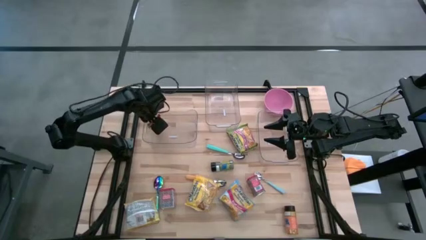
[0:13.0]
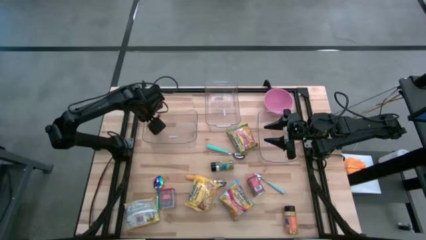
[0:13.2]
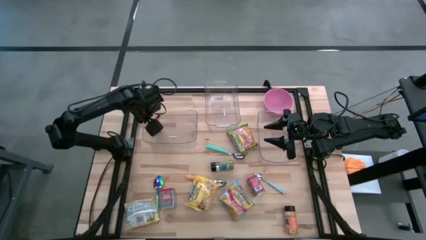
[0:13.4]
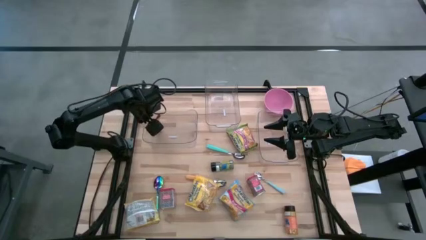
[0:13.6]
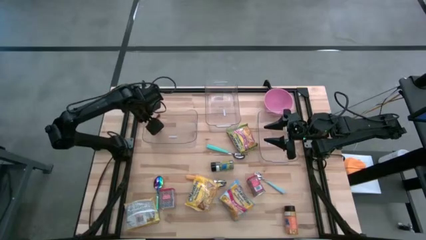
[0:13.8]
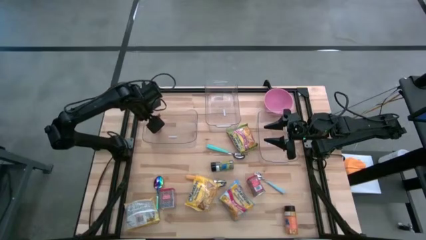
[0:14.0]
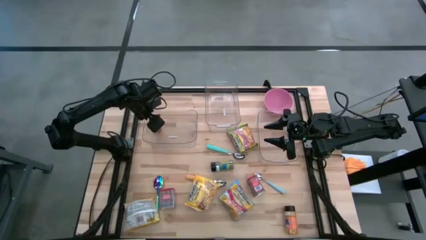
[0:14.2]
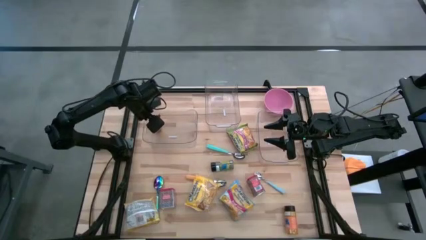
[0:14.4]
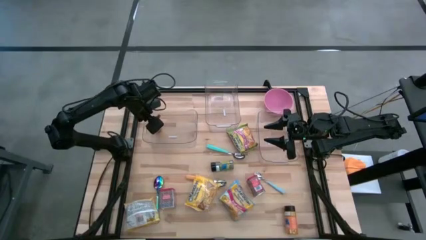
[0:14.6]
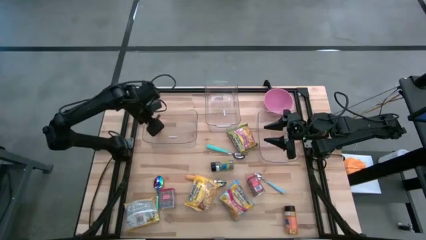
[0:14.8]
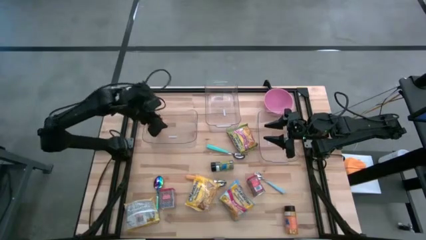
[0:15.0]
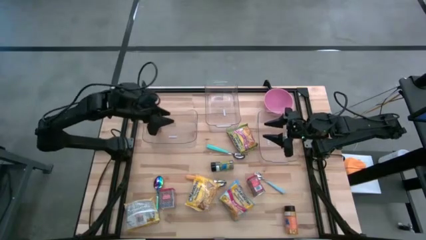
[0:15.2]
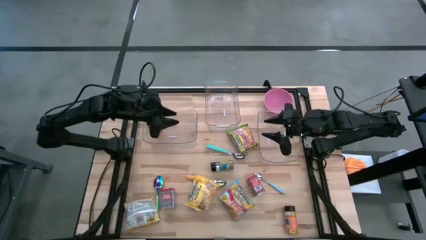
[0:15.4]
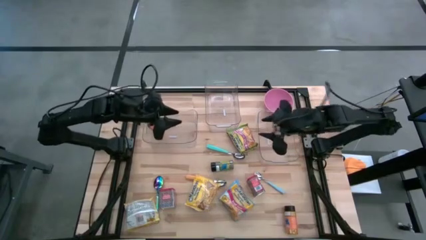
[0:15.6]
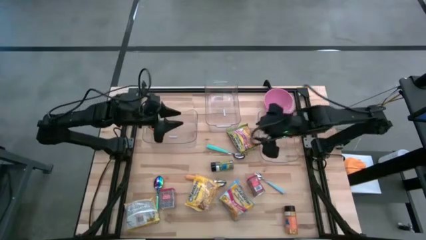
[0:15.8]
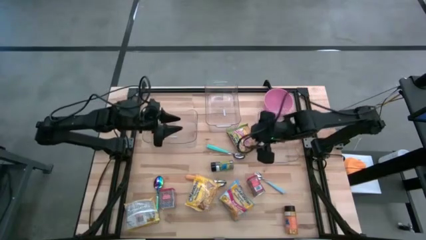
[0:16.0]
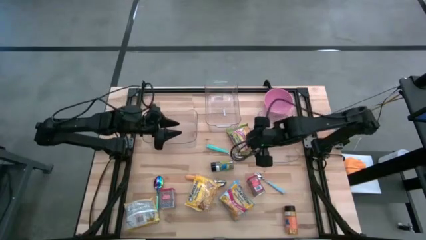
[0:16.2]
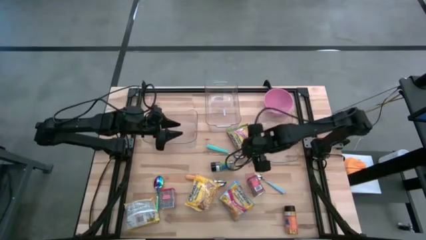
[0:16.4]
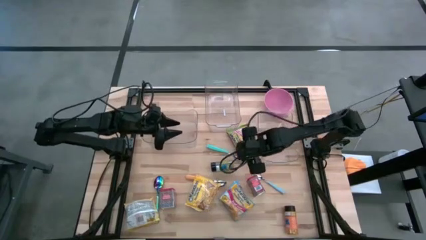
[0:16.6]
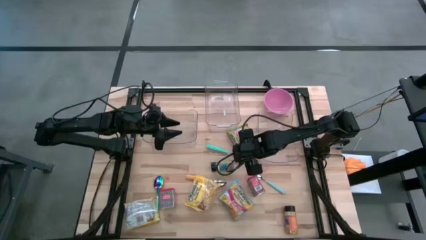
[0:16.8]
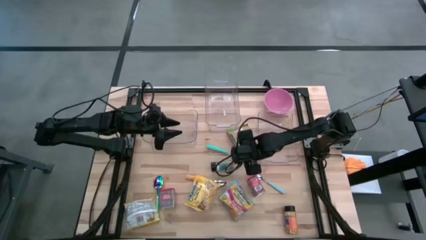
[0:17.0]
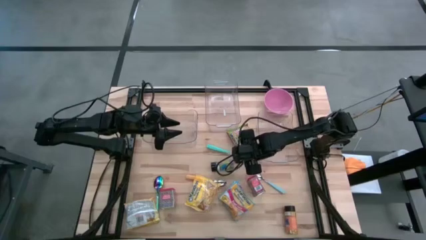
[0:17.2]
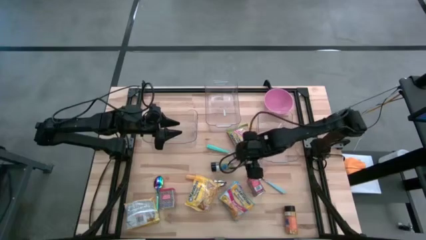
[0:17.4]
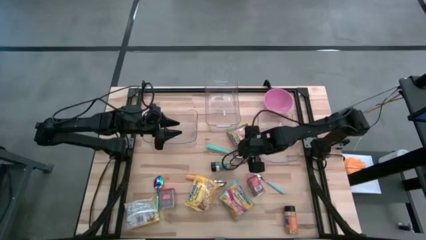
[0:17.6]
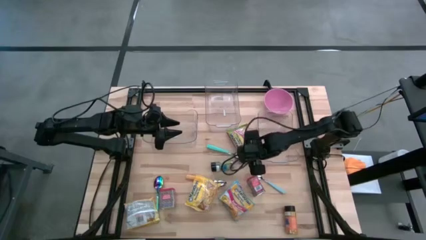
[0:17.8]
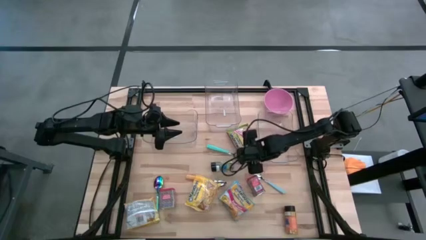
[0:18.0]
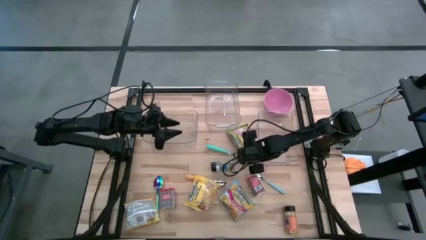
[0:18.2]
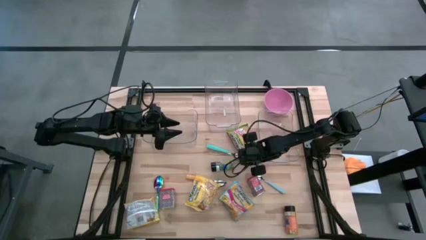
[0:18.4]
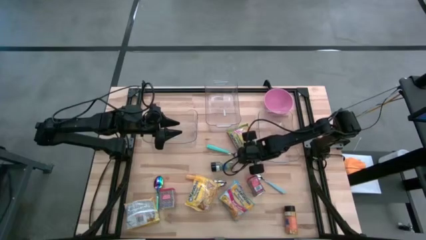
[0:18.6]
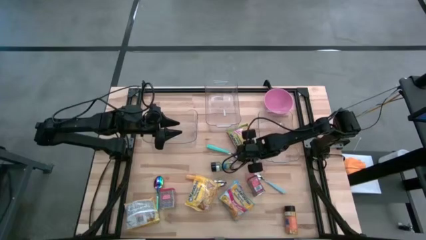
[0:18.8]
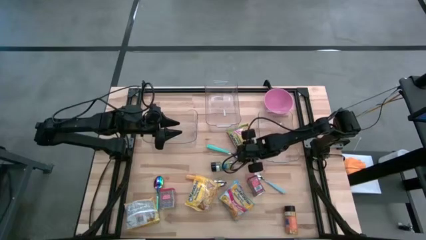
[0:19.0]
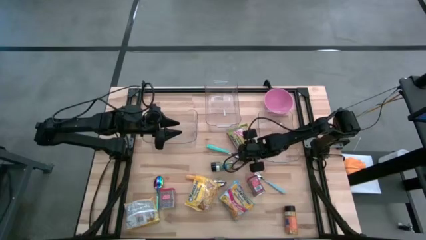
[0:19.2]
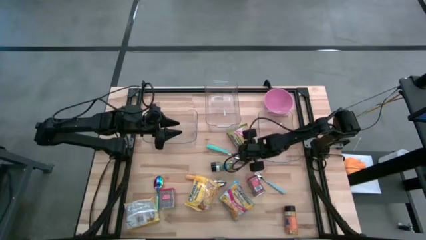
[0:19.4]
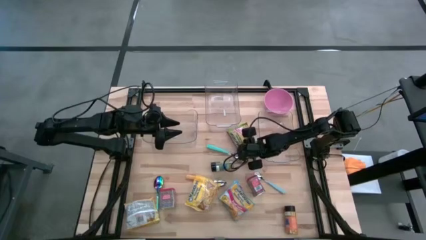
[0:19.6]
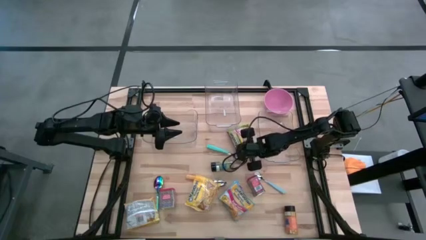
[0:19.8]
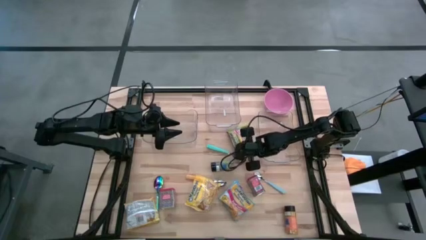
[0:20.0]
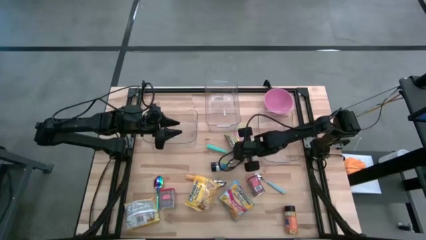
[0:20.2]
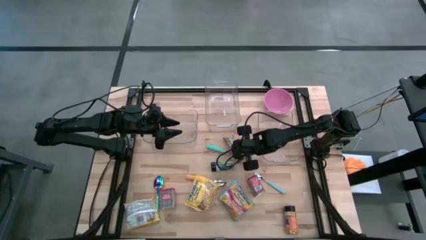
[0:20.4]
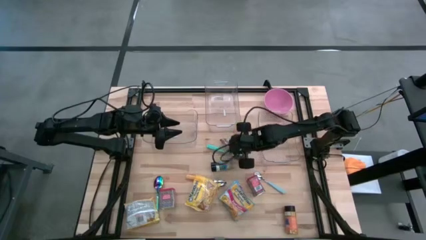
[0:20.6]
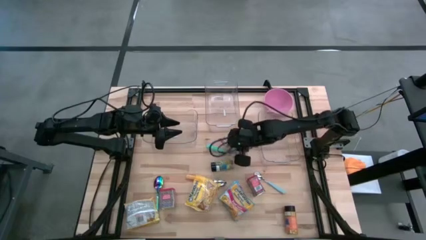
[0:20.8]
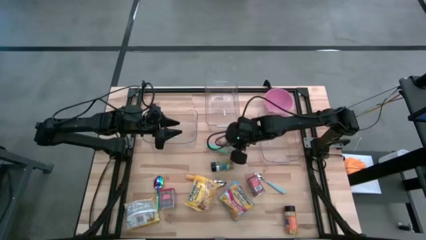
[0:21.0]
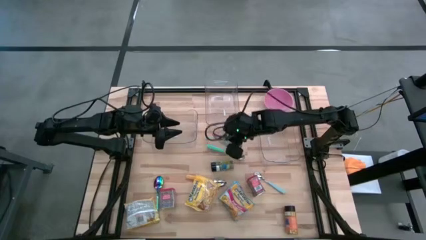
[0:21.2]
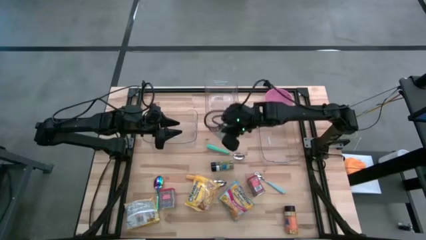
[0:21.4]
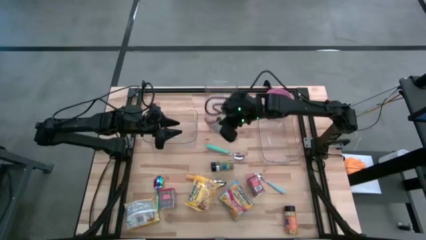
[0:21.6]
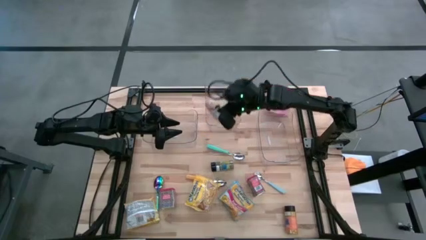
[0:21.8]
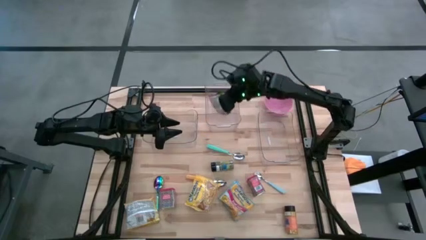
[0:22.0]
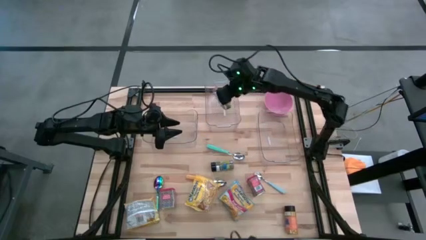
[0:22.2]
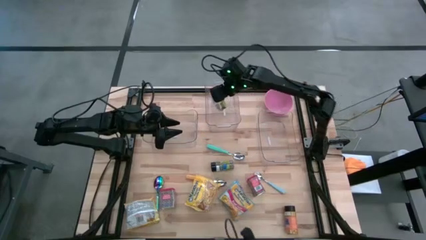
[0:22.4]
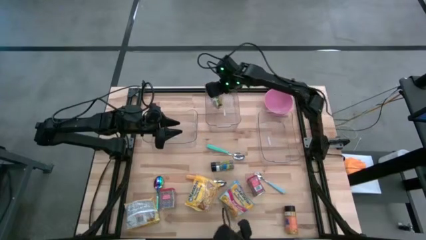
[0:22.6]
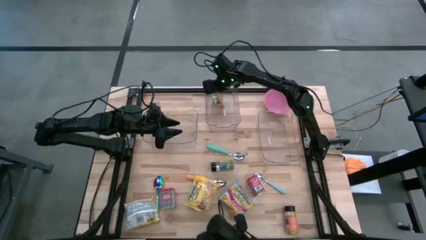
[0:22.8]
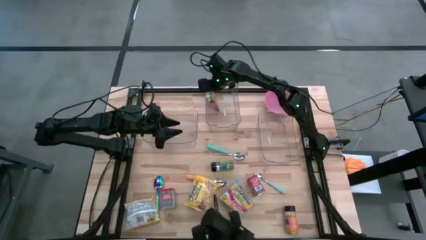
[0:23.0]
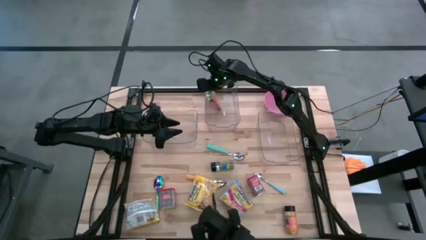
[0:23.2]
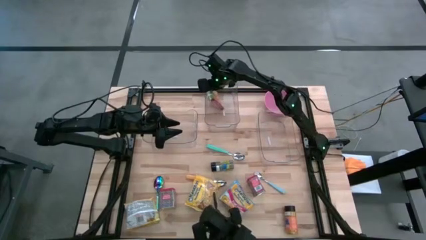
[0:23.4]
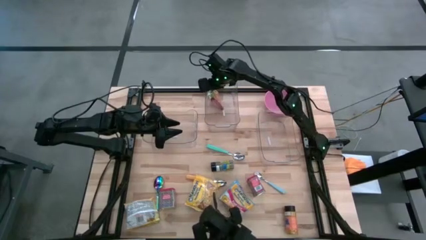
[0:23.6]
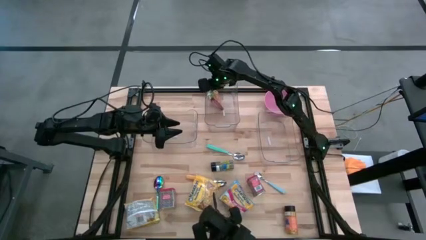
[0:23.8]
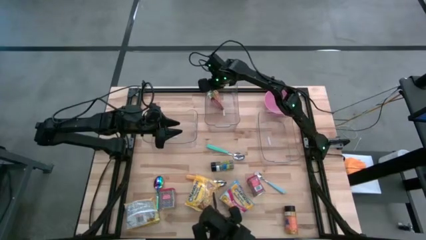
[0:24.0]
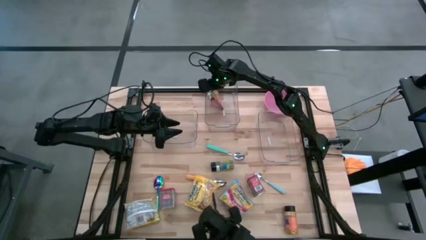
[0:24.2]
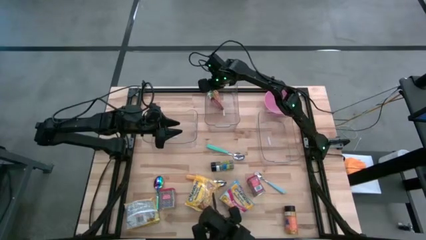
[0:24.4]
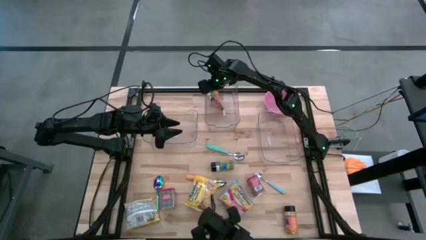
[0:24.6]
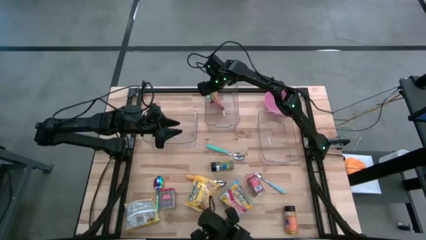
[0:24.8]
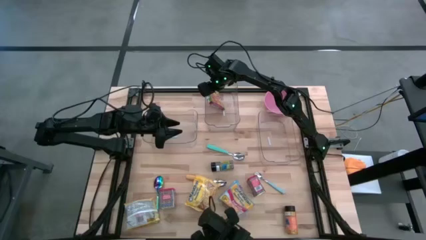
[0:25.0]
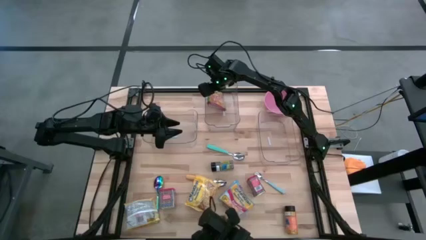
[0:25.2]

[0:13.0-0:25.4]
Put the green noodle pack into the middle transparent bin

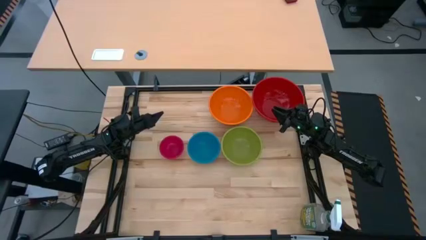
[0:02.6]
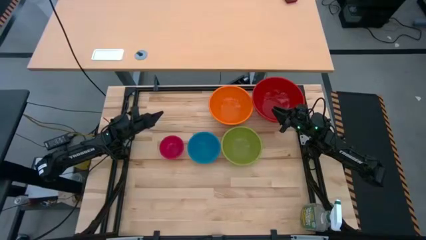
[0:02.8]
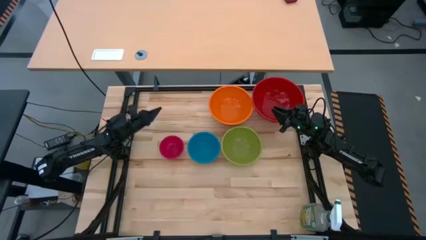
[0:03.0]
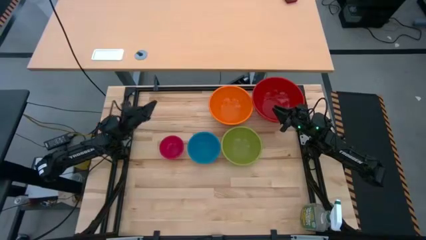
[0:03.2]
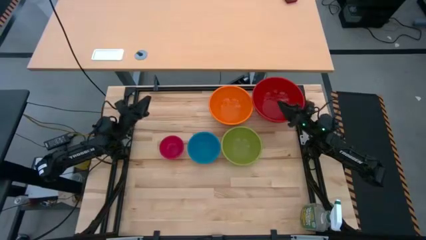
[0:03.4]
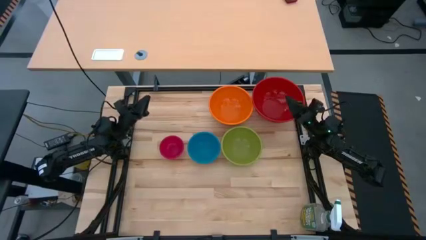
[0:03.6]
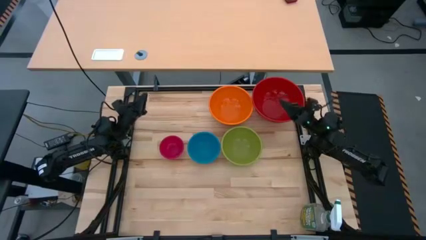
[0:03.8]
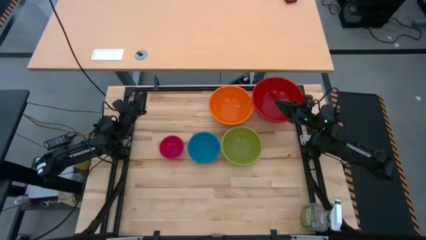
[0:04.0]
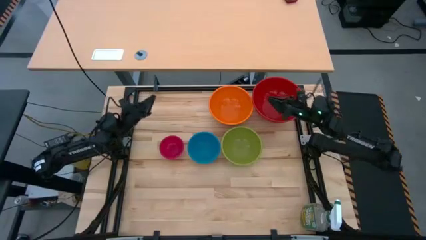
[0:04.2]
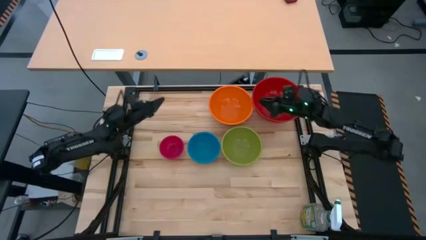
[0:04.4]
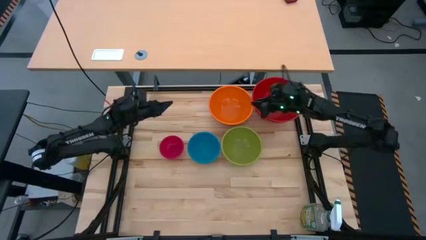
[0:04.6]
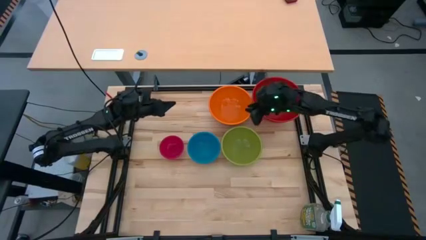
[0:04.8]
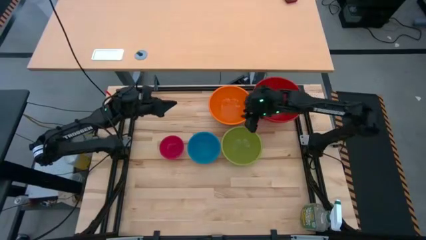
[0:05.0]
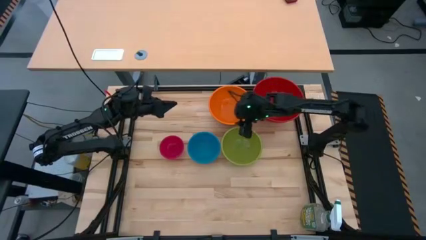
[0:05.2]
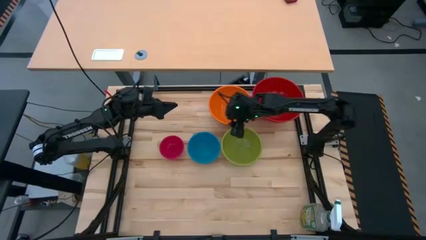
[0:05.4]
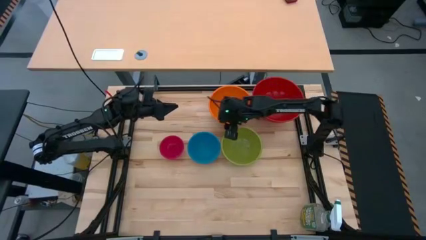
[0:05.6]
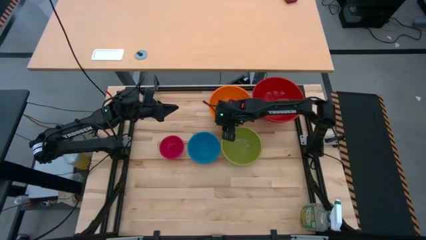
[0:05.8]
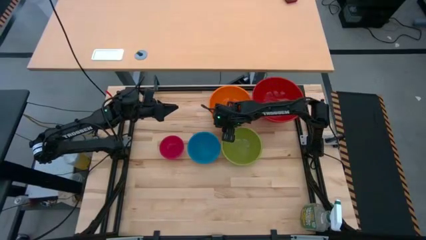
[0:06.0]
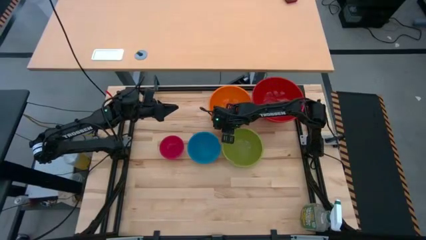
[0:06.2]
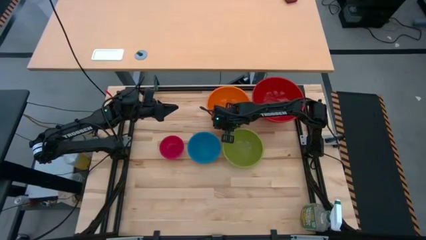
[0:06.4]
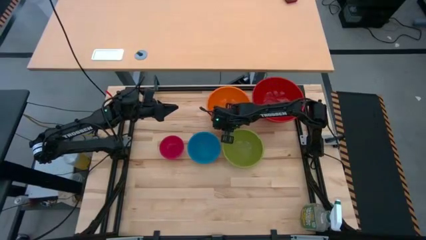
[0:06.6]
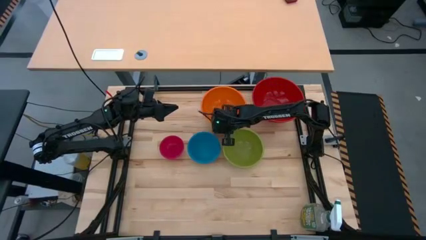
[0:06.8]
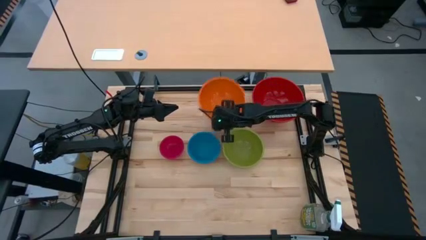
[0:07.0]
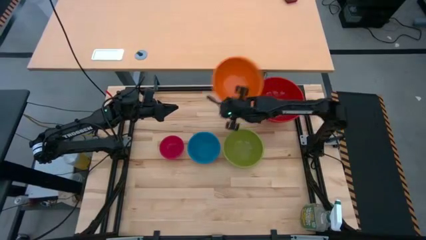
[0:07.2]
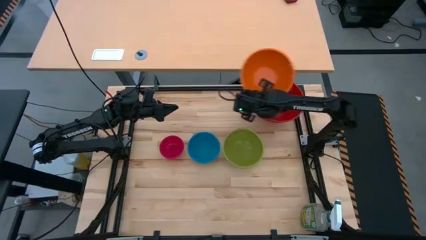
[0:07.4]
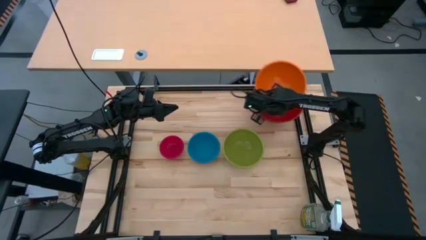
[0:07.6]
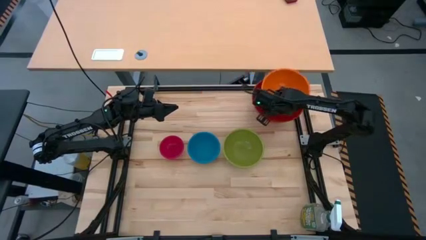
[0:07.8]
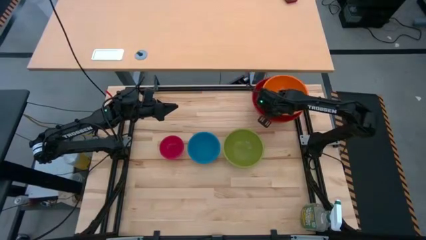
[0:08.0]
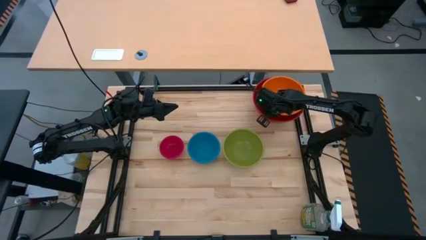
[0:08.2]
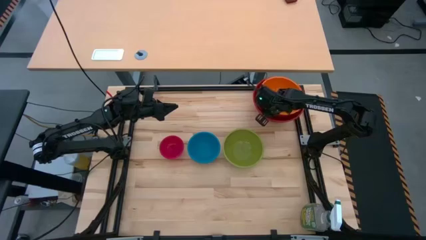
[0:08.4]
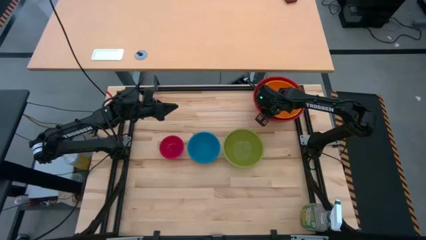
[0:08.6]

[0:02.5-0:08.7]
Stack the orange bowl on top of the red bowl
